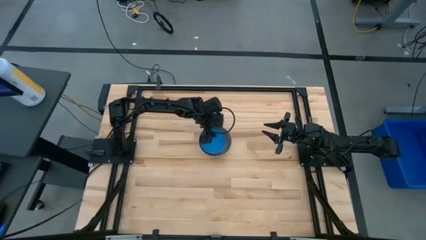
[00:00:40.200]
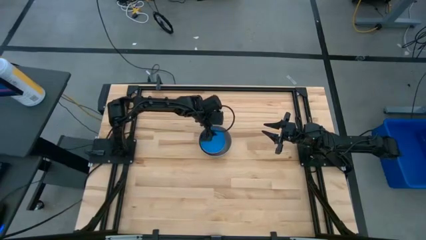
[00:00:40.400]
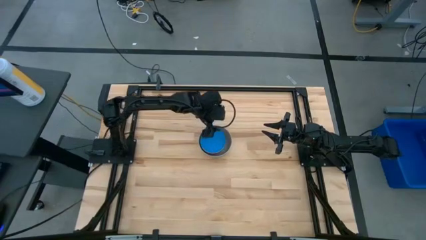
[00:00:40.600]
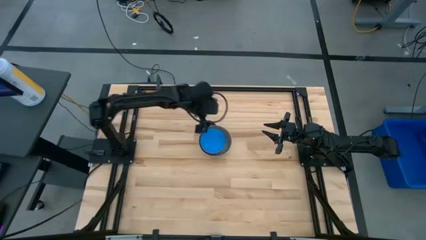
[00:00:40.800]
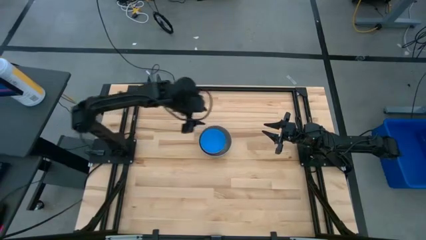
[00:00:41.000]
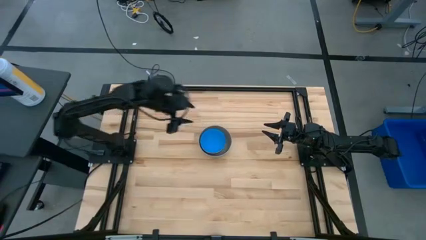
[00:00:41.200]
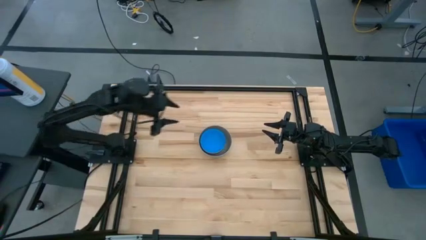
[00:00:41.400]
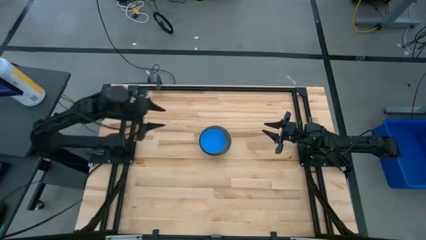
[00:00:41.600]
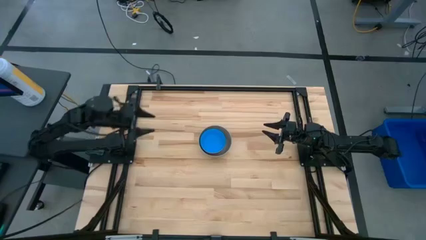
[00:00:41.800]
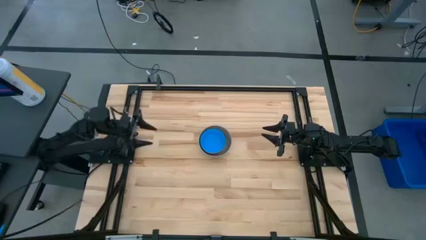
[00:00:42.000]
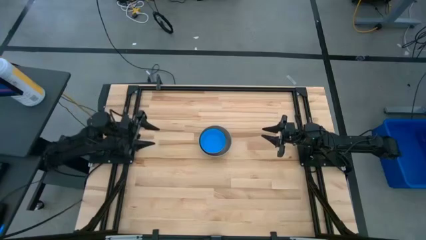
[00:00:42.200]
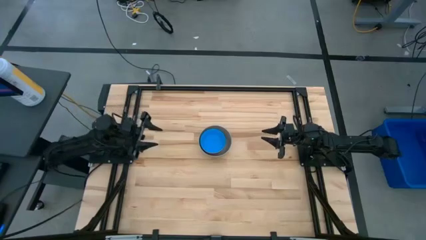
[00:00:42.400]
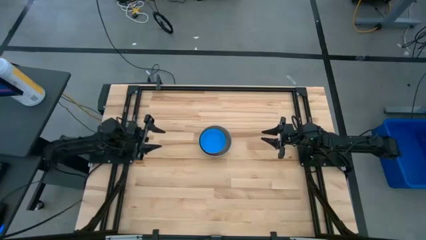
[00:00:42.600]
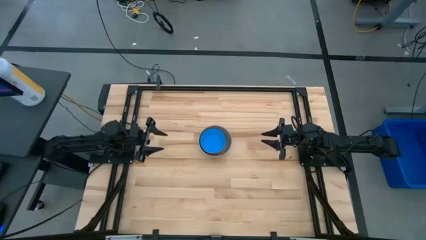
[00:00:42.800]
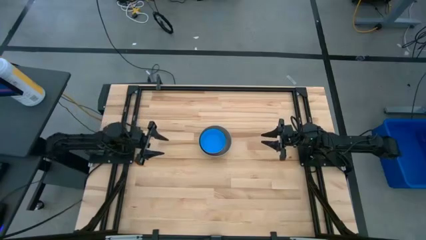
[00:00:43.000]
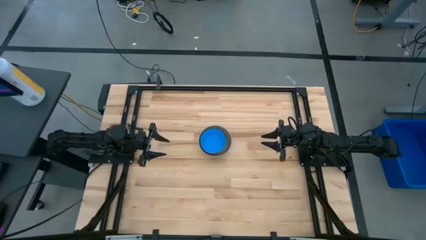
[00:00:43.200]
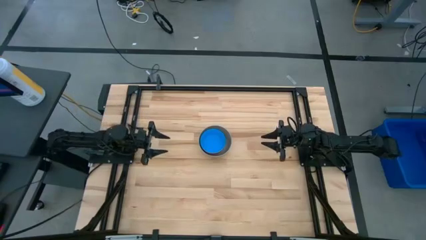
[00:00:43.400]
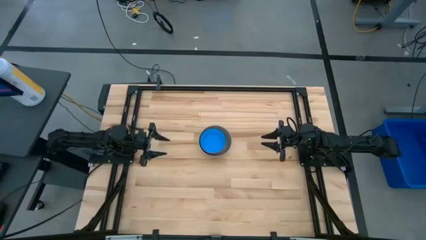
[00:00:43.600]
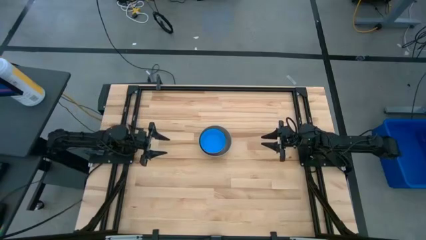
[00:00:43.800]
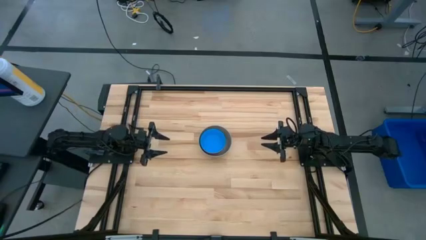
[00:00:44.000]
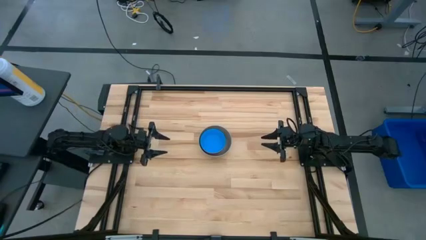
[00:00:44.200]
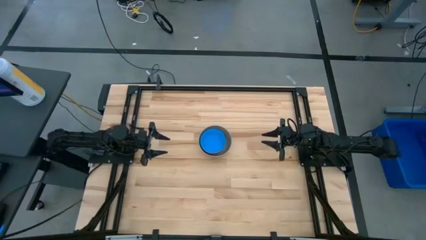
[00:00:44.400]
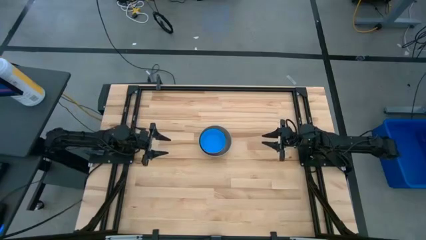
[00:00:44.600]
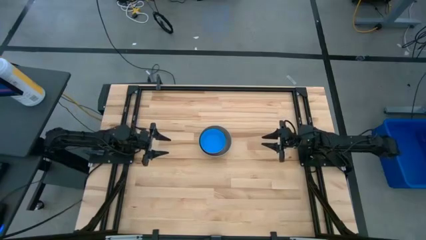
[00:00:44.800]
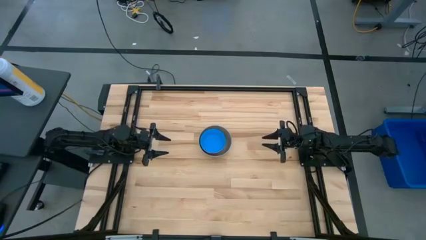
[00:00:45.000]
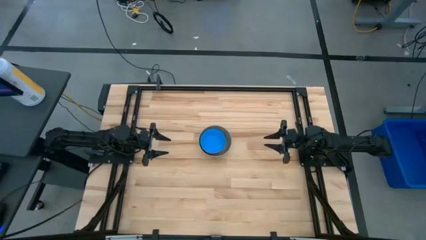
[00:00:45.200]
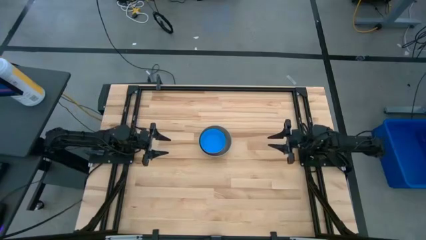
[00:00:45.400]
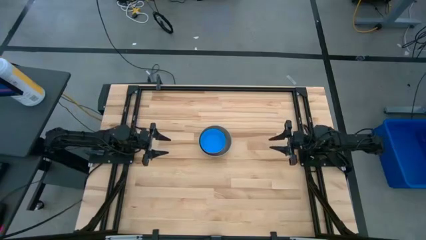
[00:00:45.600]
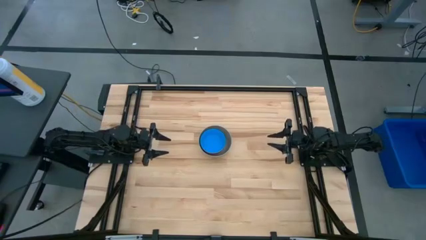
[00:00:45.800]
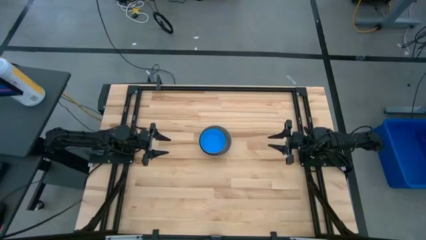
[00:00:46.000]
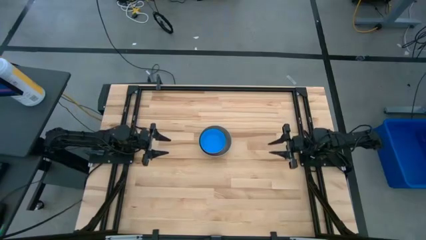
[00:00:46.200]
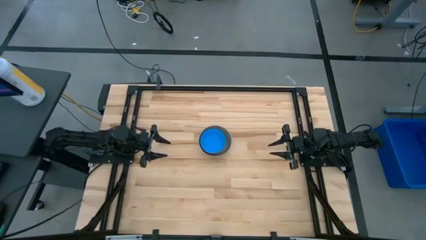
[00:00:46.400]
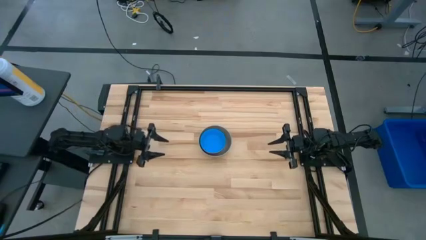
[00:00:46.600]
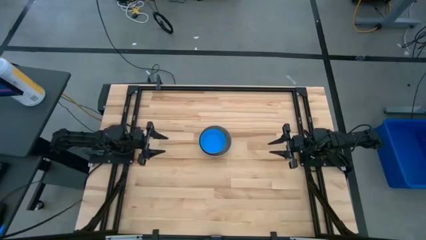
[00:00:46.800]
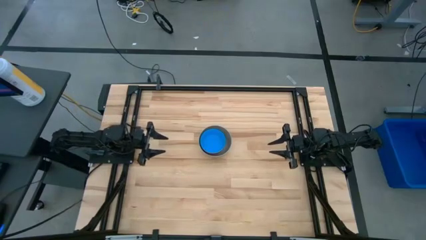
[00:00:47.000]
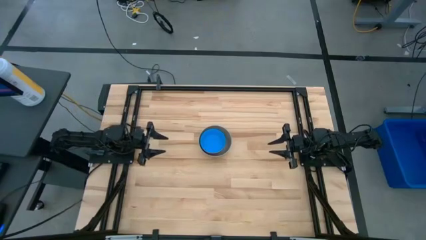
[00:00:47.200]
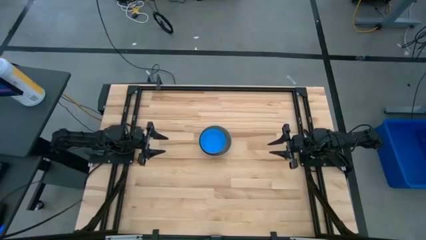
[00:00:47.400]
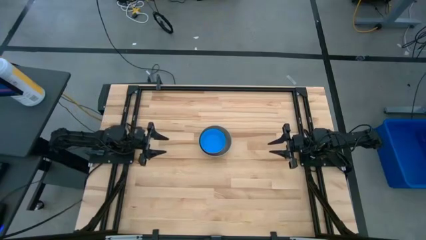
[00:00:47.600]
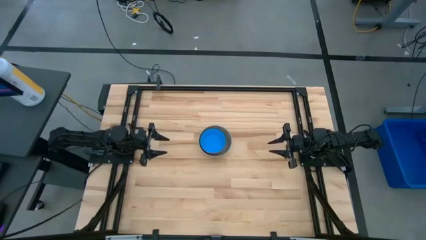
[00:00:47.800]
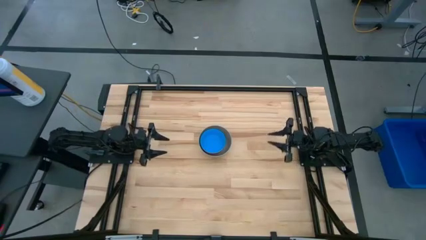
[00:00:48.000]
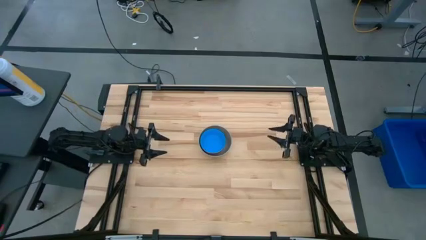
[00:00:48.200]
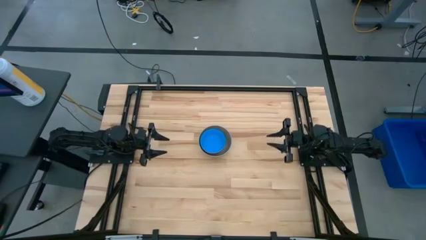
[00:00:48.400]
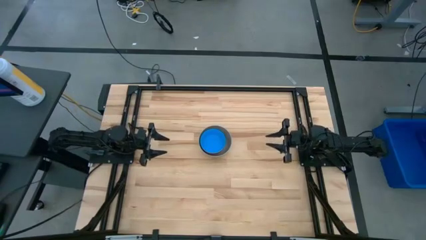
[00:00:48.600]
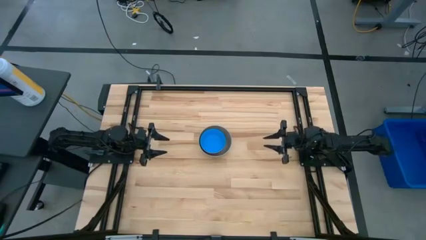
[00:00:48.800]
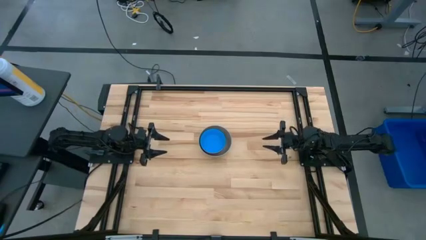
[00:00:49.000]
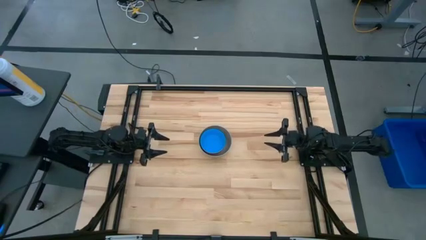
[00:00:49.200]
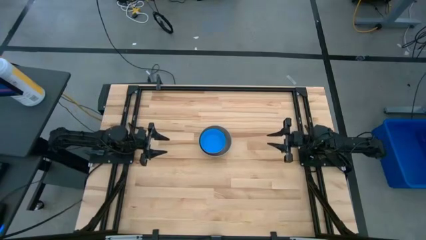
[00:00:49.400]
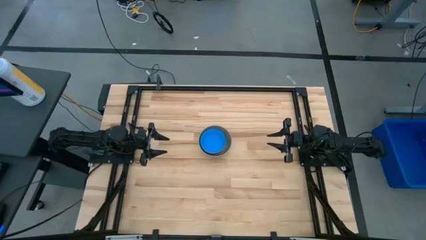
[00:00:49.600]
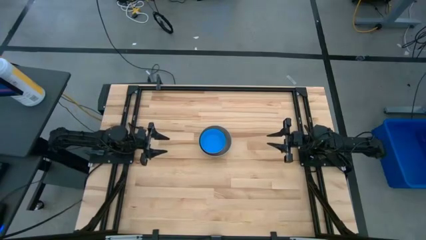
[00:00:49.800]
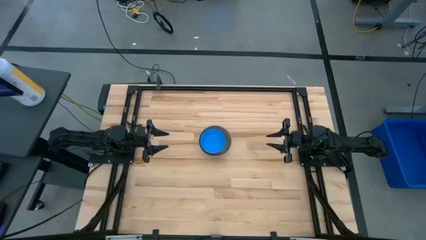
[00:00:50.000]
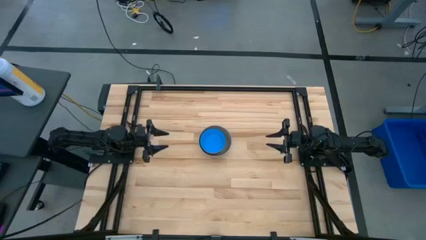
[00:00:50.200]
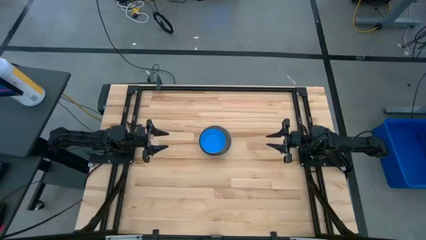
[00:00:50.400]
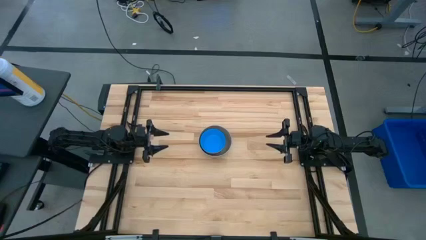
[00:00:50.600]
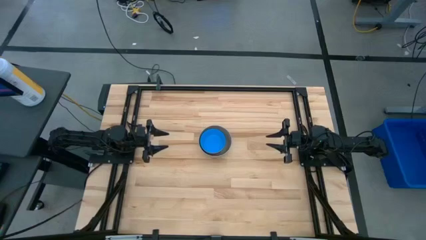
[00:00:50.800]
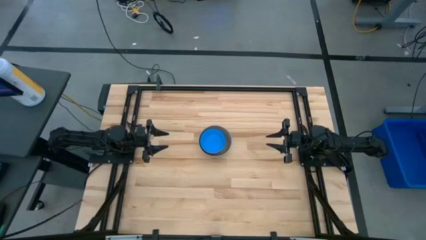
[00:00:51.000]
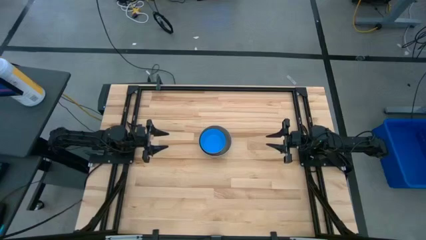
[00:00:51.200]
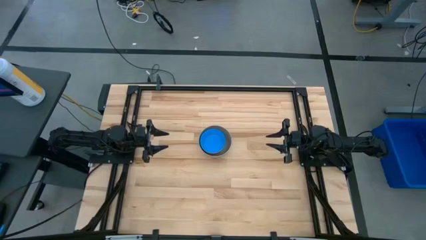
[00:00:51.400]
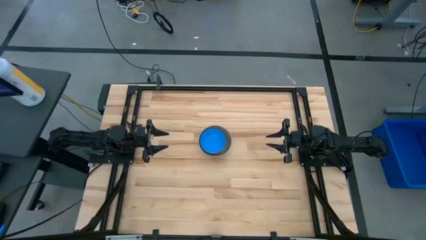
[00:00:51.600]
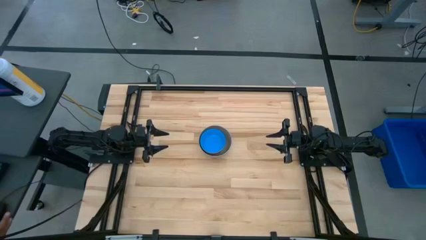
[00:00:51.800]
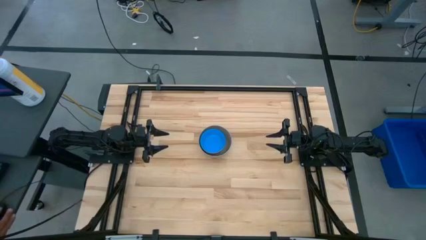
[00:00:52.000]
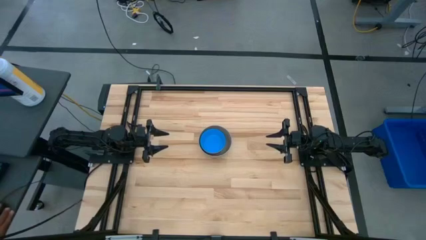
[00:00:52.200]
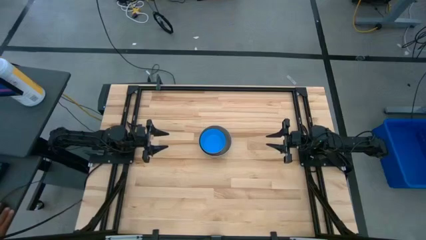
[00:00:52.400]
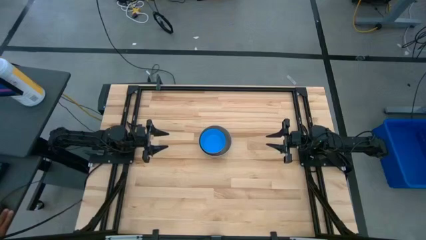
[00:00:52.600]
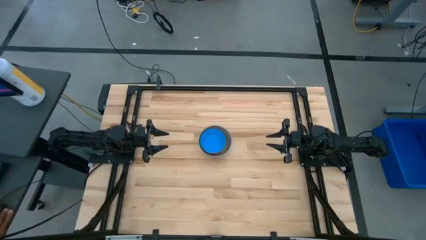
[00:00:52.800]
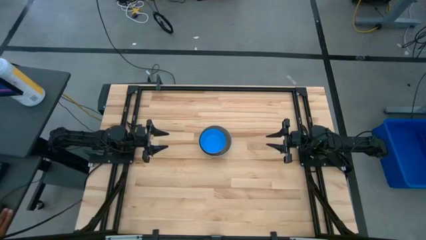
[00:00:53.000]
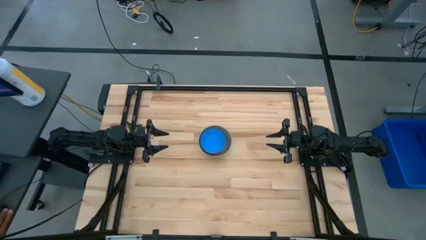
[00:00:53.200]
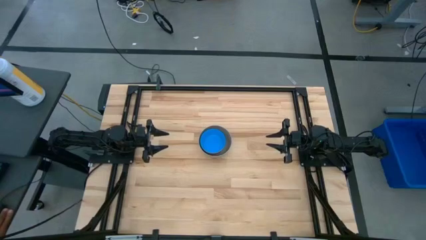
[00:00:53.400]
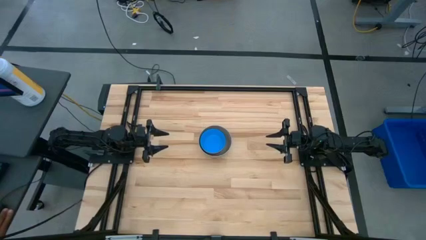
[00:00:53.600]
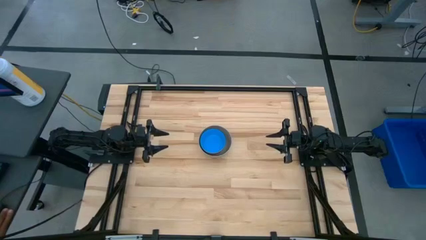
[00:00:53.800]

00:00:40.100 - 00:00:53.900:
Return to Home Position
